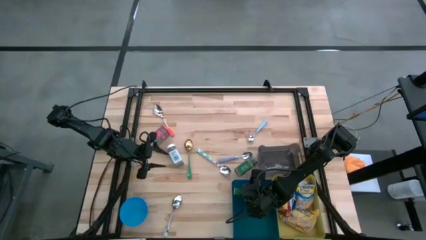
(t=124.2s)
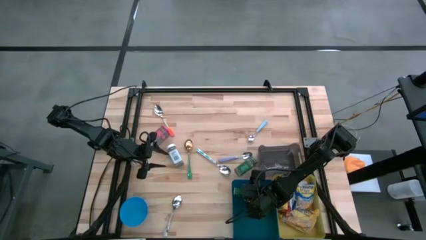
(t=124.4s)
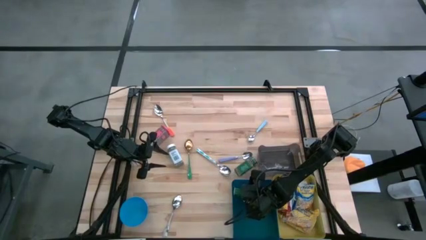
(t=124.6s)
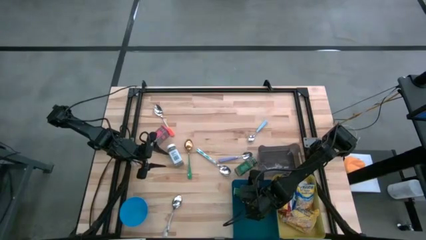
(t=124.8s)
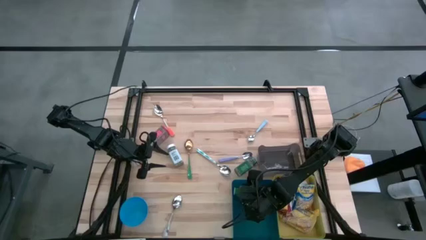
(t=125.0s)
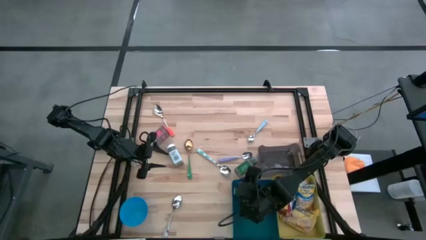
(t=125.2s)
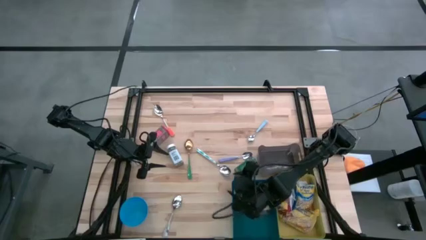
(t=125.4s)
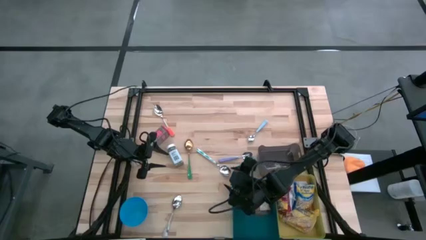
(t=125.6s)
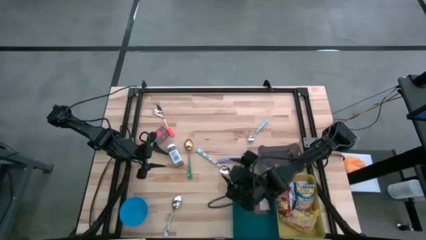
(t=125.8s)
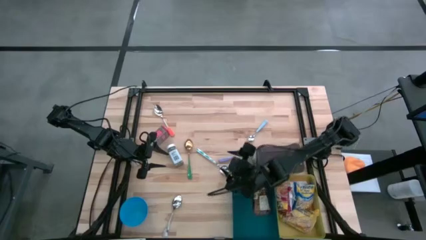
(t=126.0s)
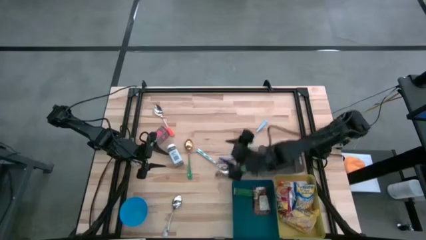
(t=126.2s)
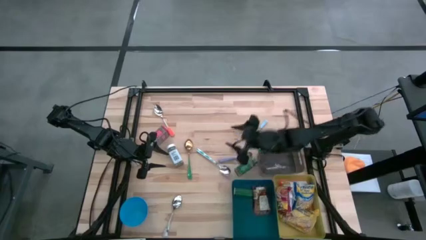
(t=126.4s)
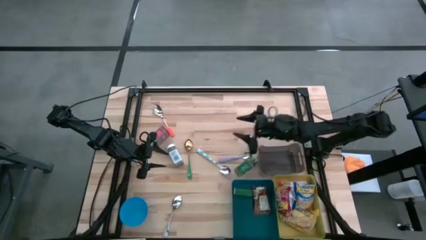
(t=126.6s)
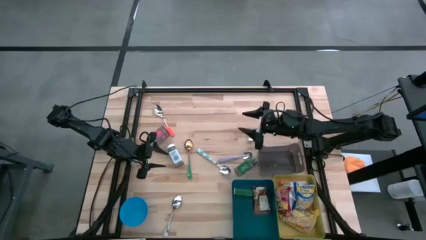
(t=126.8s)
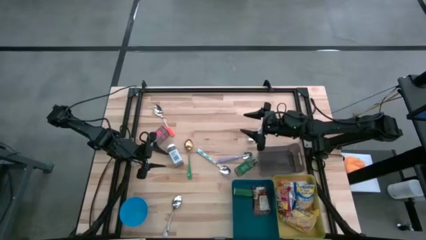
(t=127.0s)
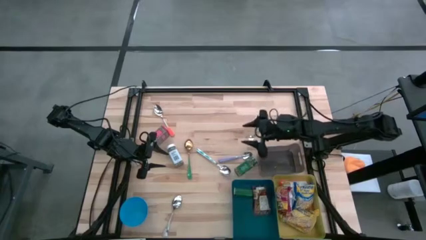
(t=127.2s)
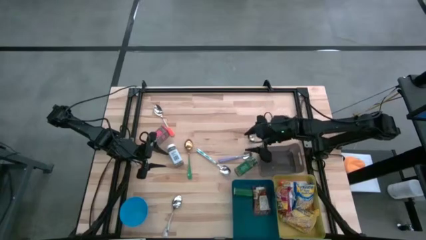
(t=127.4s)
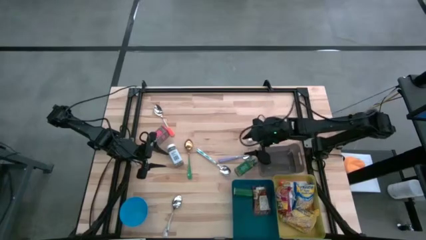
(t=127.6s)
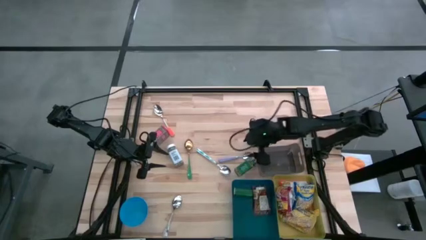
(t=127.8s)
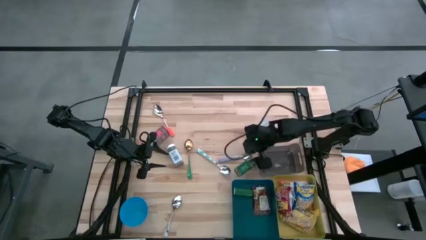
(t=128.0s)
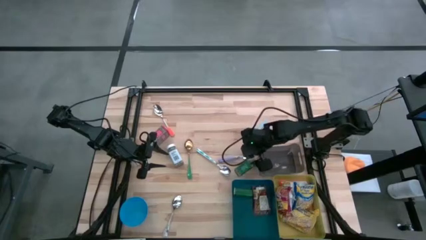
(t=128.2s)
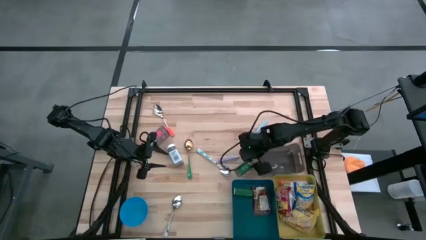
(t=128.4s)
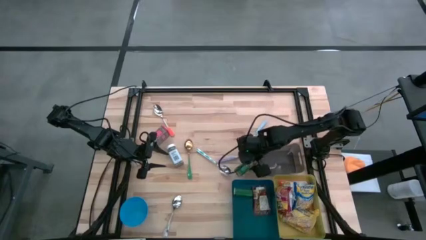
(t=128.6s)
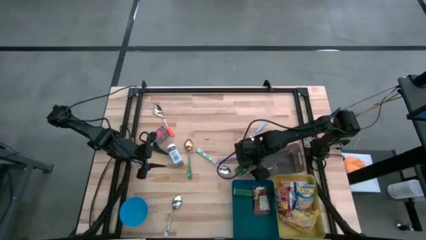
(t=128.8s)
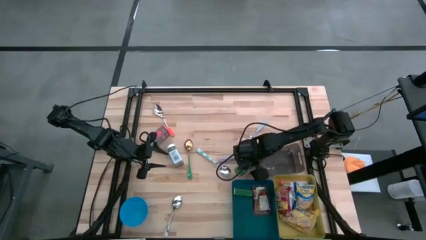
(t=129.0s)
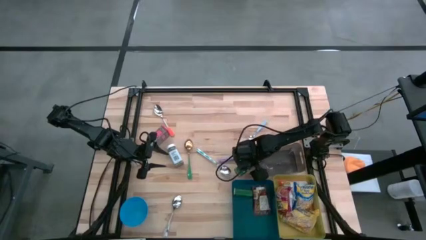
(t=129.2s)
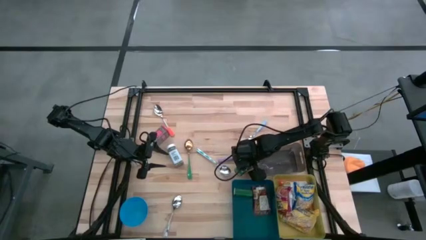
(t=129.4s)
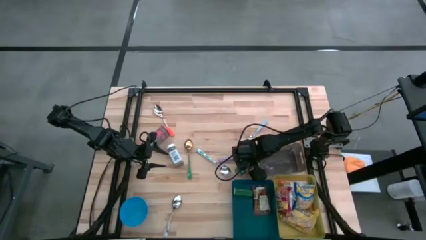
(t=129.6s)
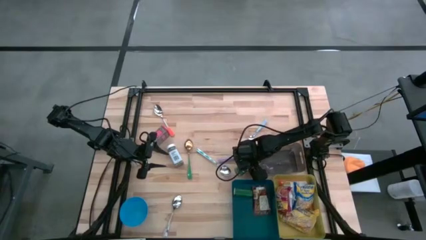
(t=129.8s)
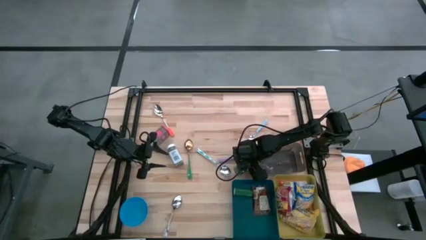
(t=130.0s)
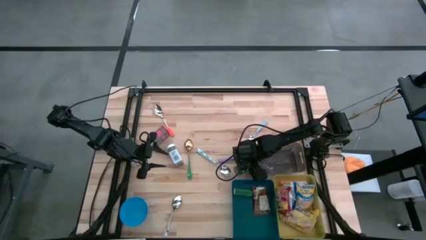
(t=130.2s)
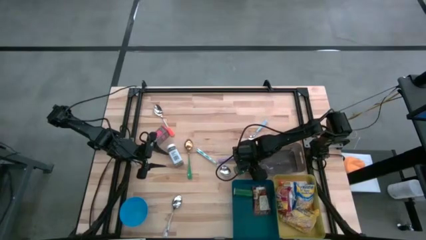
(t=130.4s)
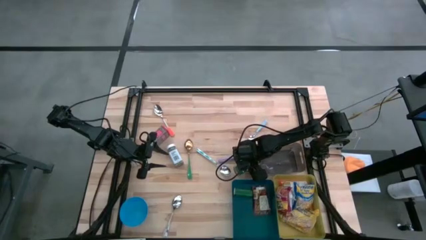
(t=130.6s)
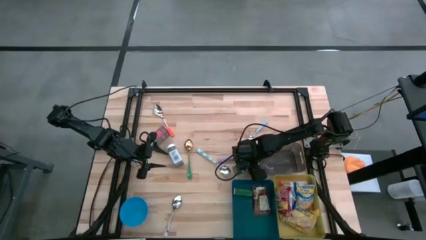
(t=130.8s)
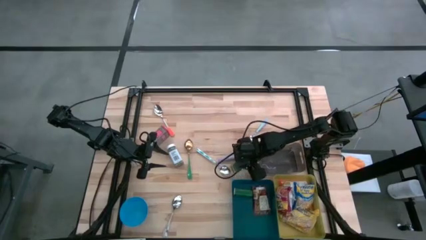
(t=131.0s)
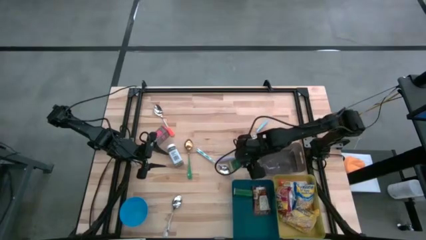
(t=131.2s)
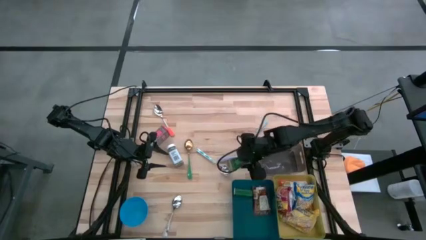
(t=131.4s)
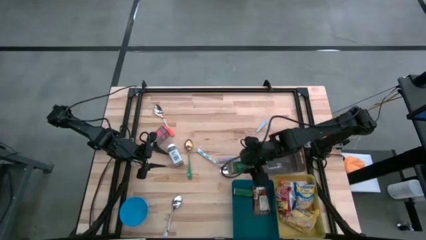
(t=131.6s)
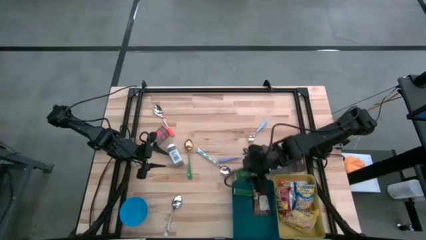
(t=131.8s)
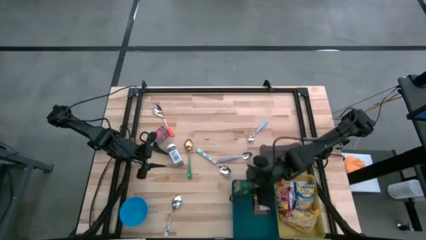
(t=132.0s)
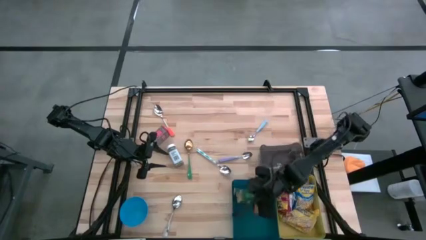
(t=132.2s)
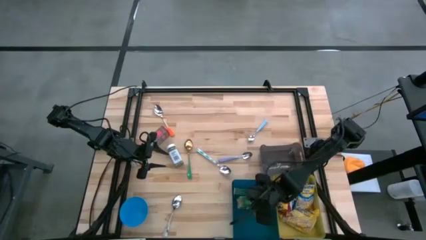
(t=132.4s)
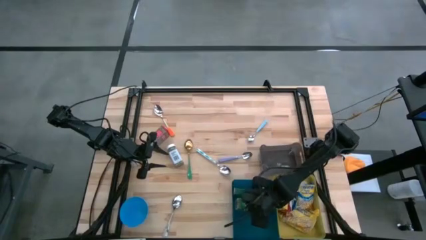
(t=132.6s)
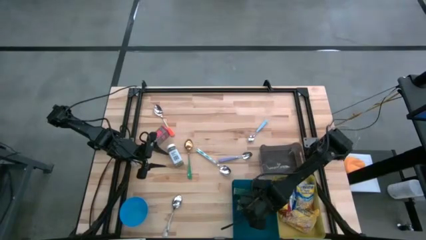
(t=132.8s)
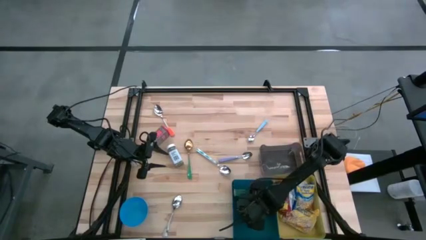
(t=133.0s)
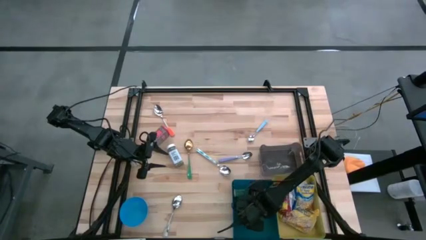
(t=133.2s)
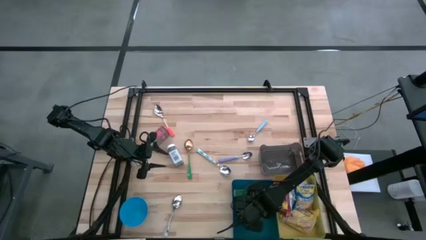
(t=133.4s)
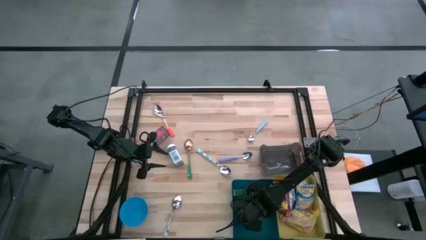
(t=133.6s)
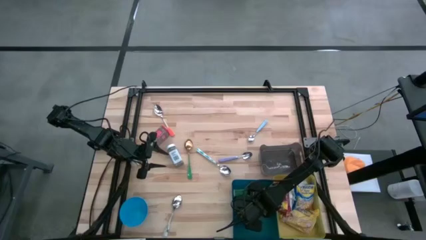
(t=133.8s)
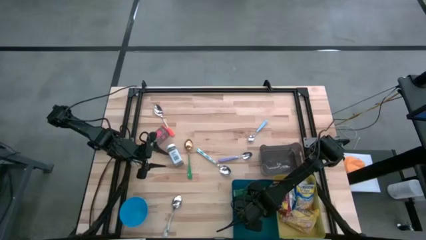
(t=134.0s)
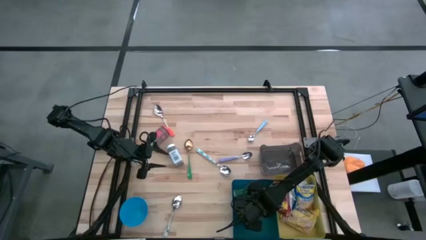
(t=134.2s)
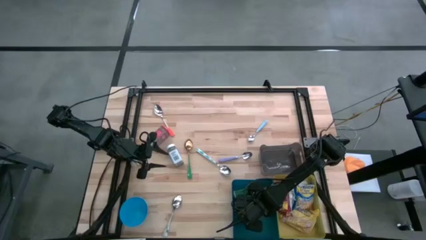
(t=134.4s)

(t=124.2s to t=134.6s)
Put the green seasoning bottle into the blue bin
